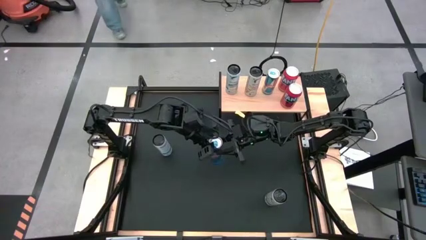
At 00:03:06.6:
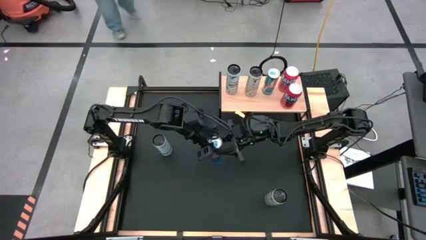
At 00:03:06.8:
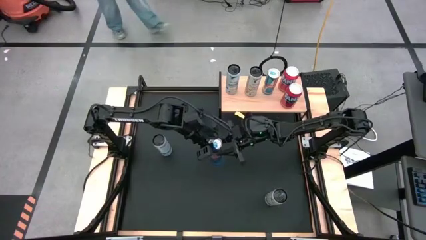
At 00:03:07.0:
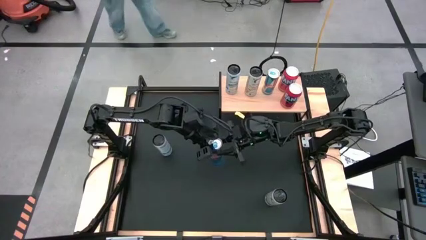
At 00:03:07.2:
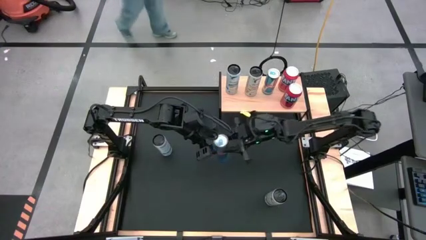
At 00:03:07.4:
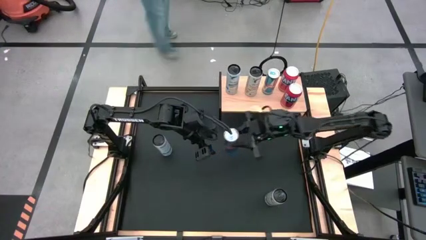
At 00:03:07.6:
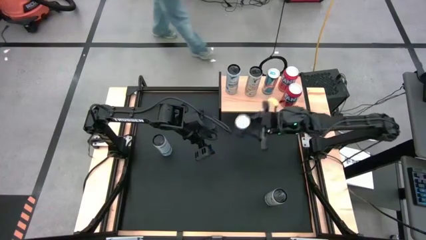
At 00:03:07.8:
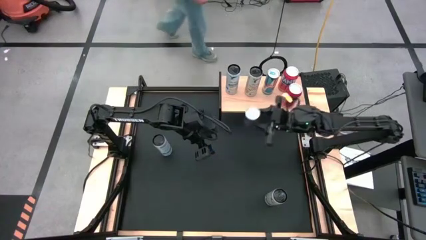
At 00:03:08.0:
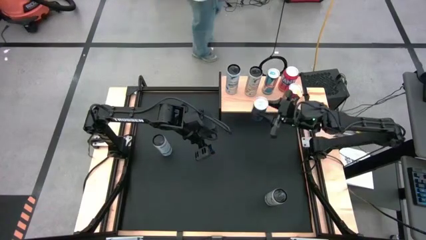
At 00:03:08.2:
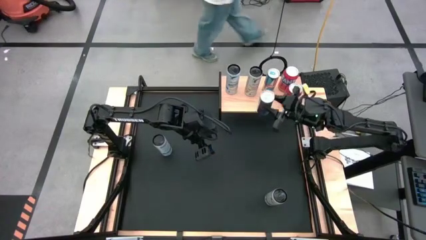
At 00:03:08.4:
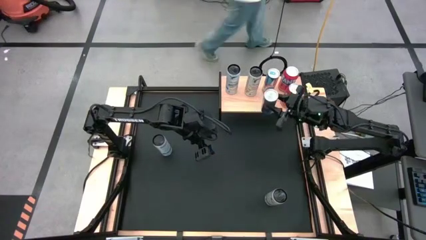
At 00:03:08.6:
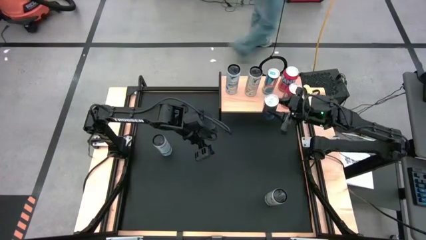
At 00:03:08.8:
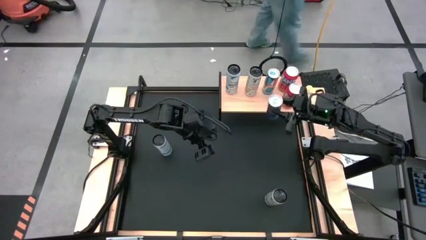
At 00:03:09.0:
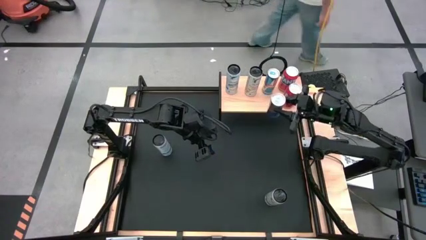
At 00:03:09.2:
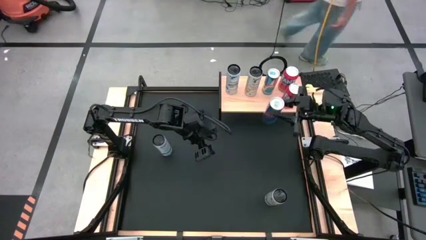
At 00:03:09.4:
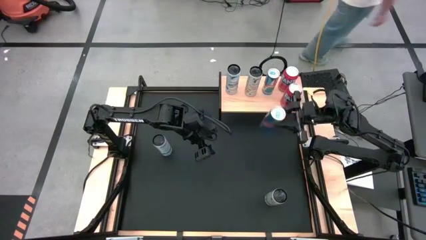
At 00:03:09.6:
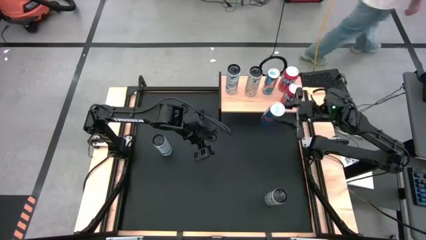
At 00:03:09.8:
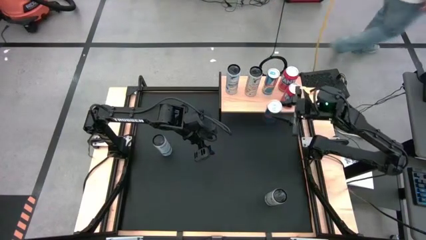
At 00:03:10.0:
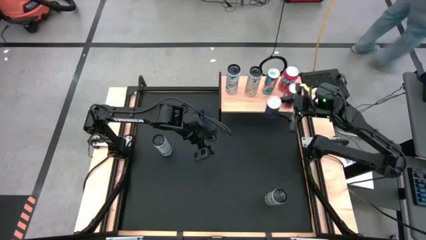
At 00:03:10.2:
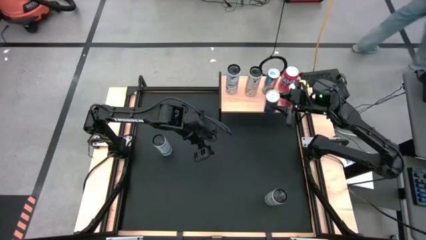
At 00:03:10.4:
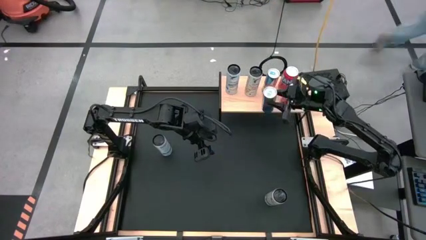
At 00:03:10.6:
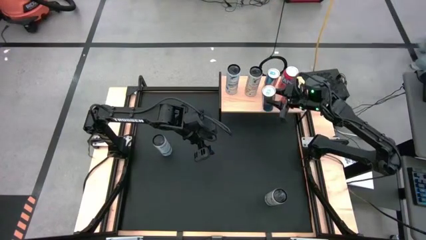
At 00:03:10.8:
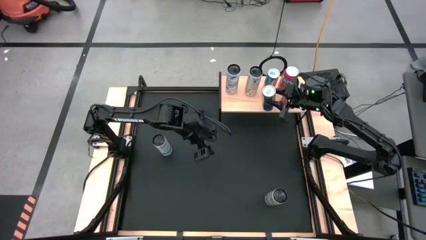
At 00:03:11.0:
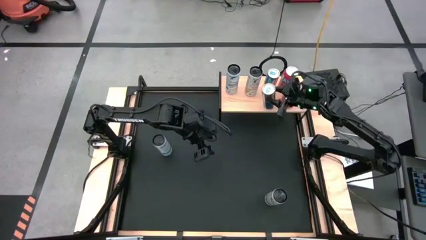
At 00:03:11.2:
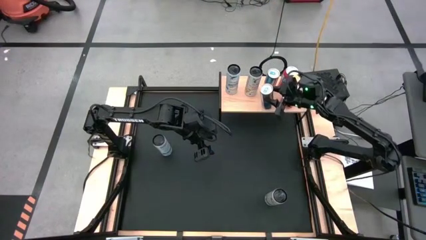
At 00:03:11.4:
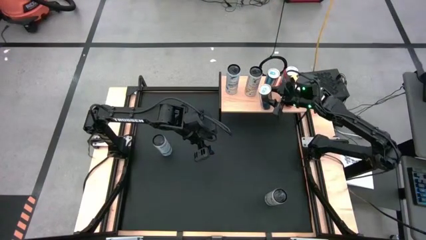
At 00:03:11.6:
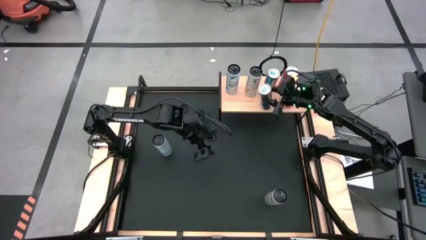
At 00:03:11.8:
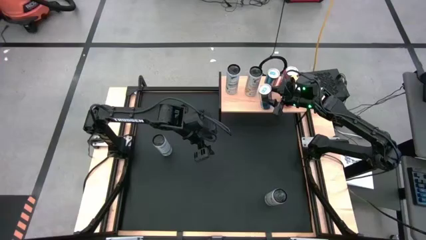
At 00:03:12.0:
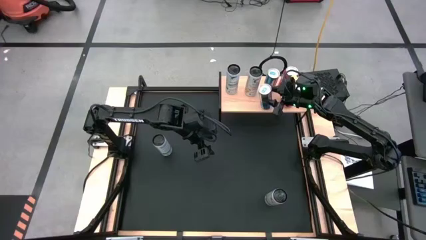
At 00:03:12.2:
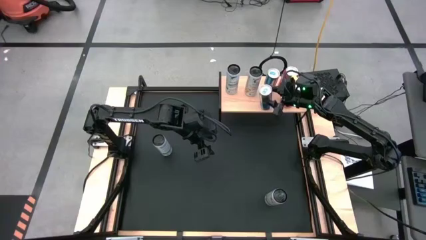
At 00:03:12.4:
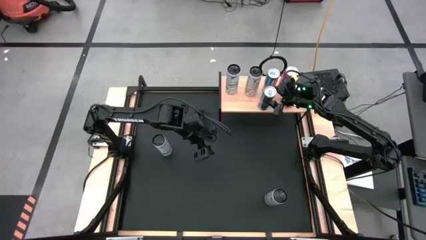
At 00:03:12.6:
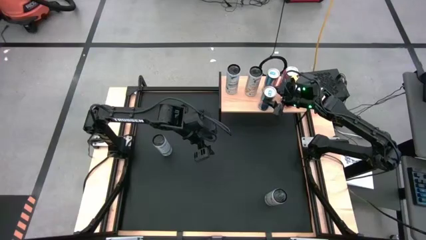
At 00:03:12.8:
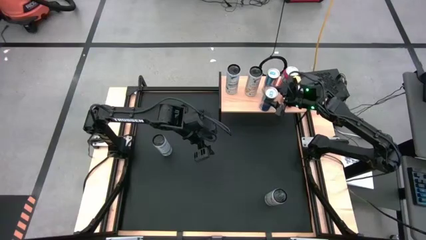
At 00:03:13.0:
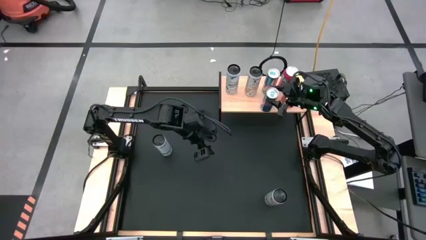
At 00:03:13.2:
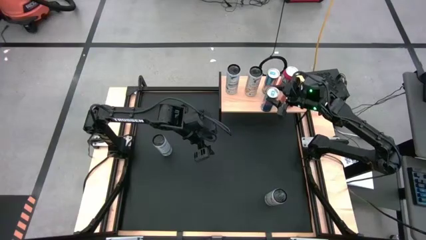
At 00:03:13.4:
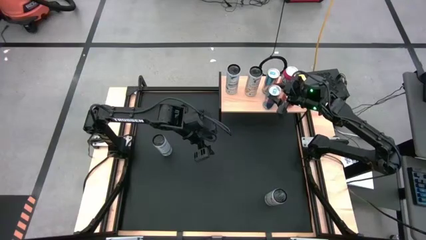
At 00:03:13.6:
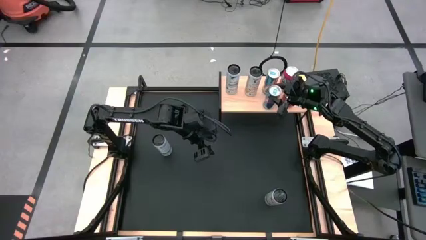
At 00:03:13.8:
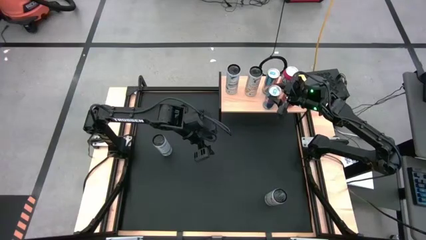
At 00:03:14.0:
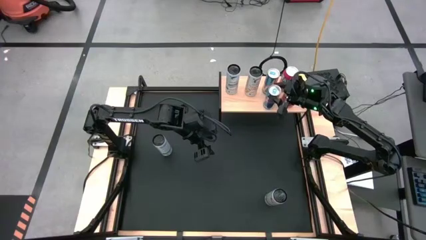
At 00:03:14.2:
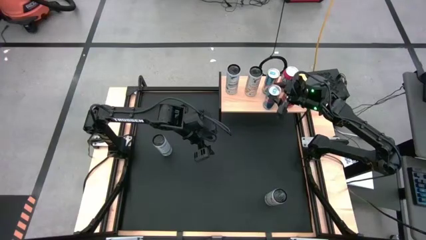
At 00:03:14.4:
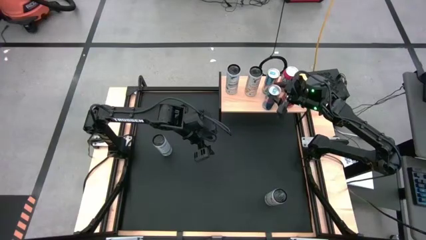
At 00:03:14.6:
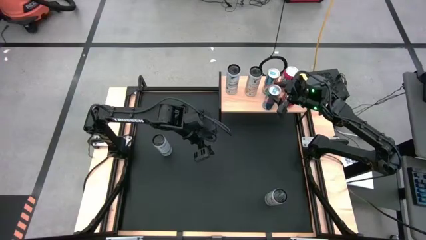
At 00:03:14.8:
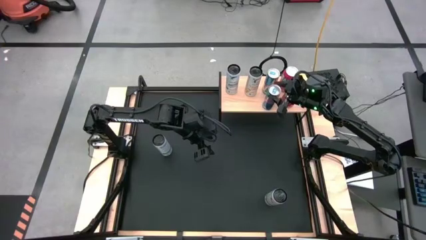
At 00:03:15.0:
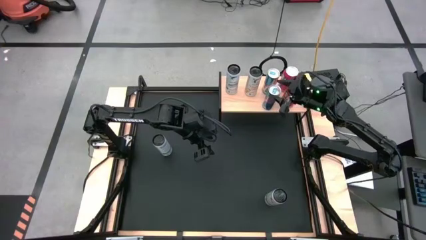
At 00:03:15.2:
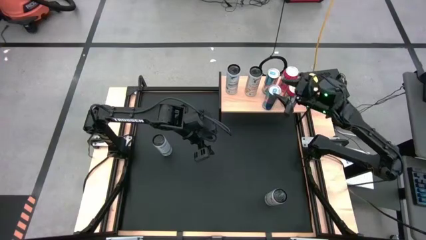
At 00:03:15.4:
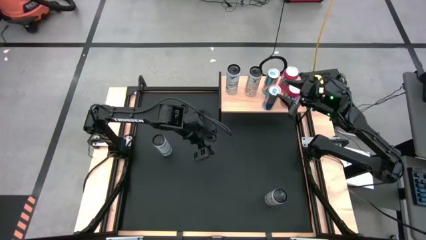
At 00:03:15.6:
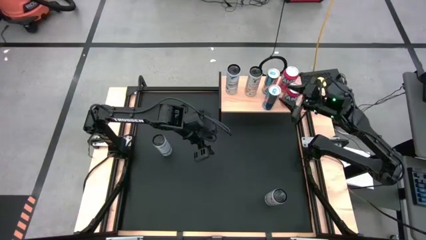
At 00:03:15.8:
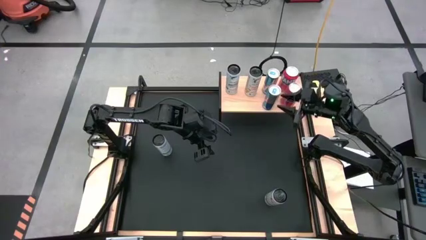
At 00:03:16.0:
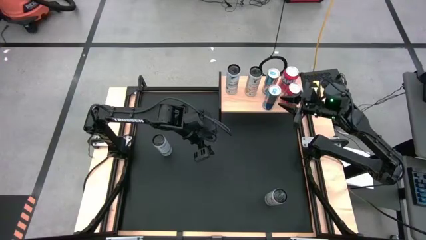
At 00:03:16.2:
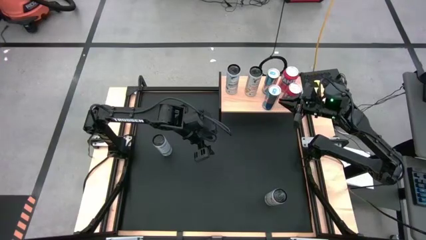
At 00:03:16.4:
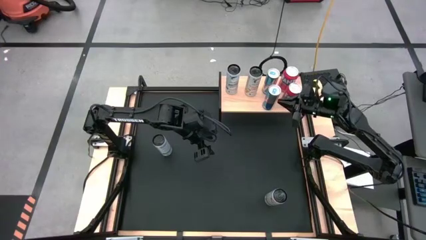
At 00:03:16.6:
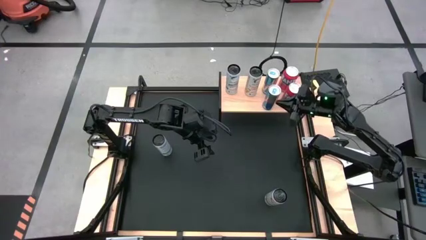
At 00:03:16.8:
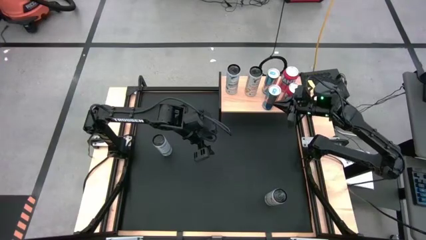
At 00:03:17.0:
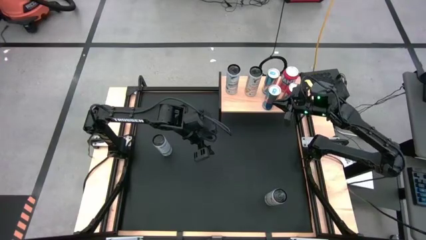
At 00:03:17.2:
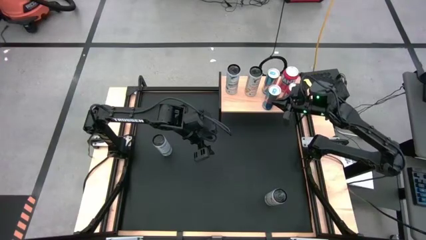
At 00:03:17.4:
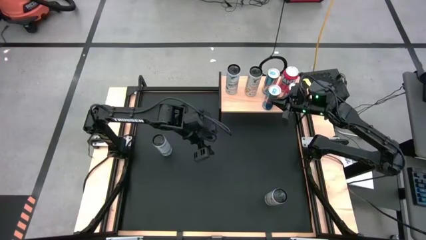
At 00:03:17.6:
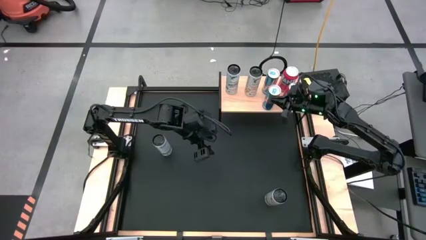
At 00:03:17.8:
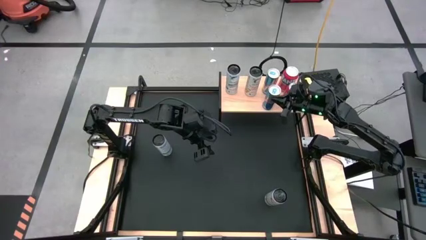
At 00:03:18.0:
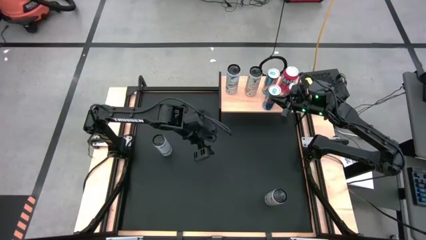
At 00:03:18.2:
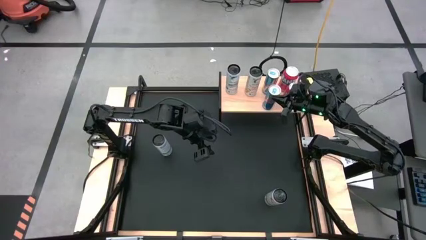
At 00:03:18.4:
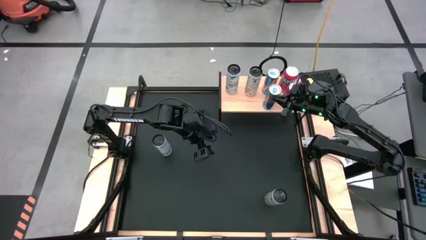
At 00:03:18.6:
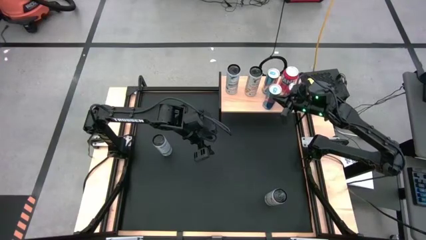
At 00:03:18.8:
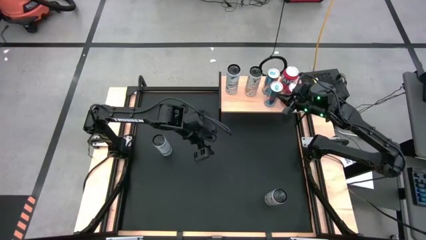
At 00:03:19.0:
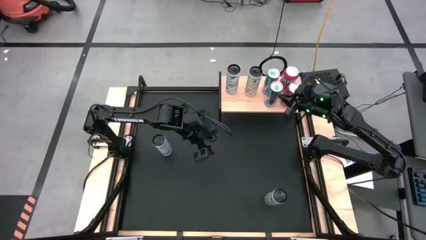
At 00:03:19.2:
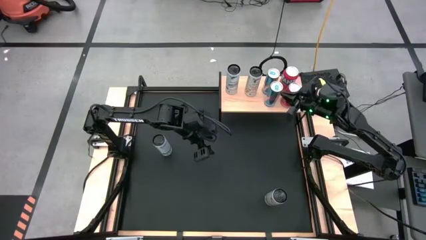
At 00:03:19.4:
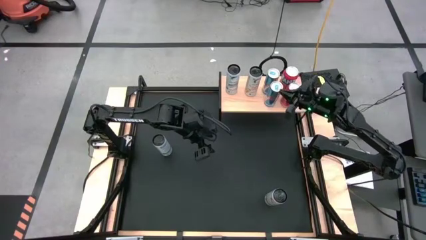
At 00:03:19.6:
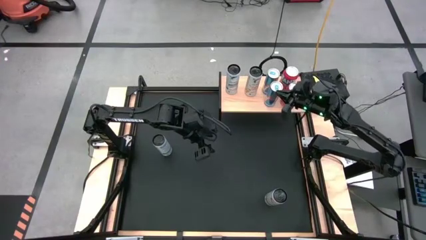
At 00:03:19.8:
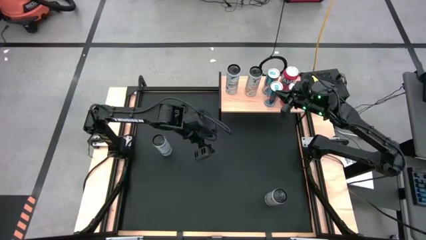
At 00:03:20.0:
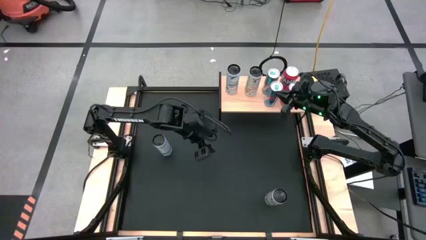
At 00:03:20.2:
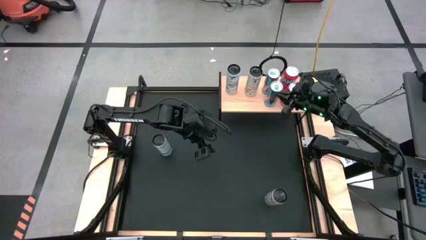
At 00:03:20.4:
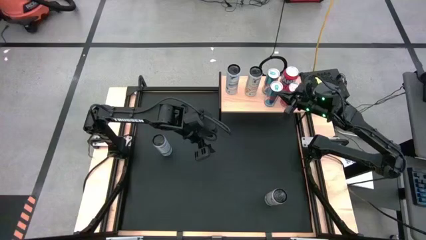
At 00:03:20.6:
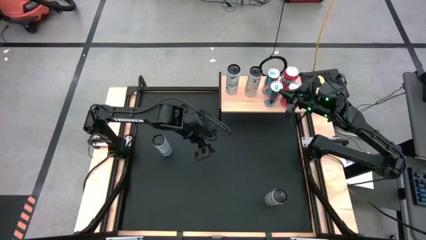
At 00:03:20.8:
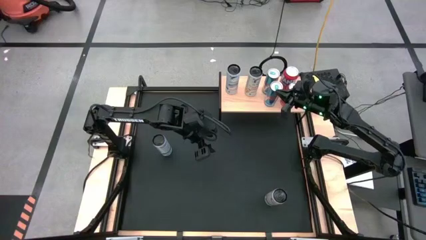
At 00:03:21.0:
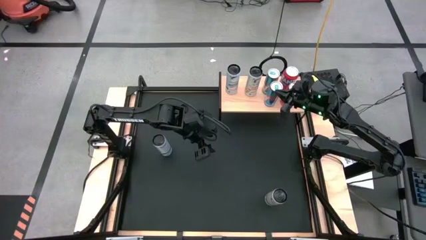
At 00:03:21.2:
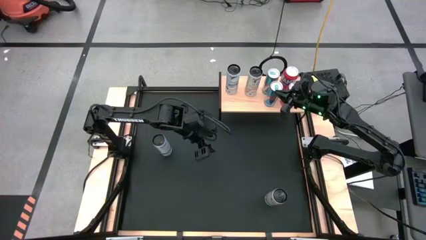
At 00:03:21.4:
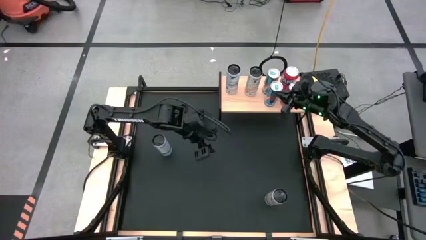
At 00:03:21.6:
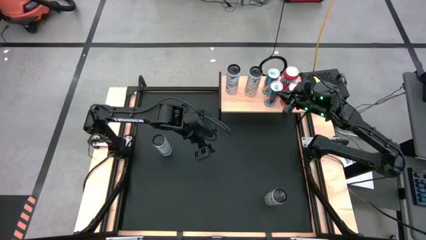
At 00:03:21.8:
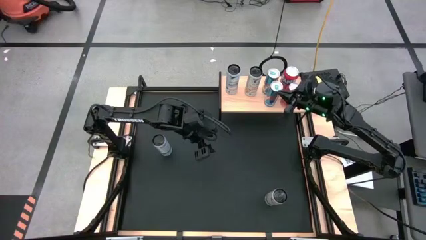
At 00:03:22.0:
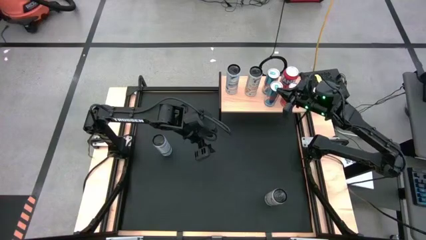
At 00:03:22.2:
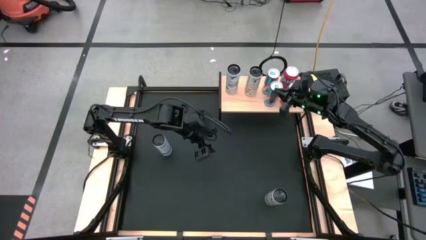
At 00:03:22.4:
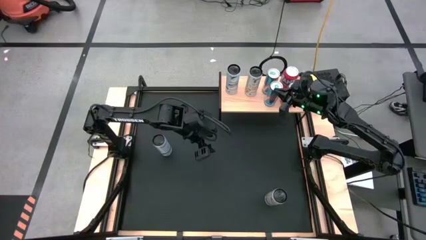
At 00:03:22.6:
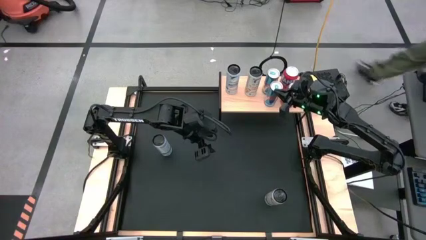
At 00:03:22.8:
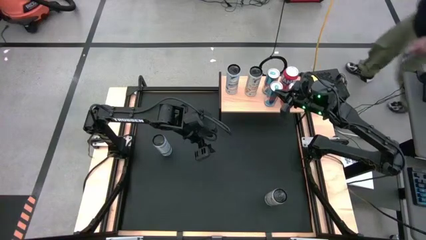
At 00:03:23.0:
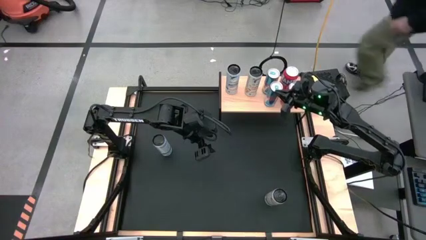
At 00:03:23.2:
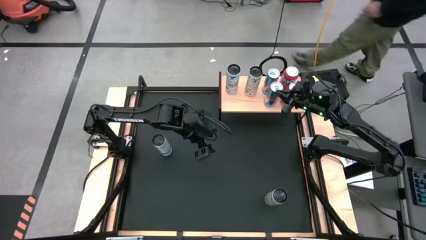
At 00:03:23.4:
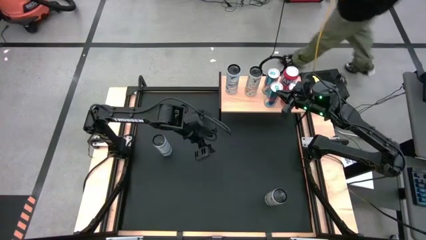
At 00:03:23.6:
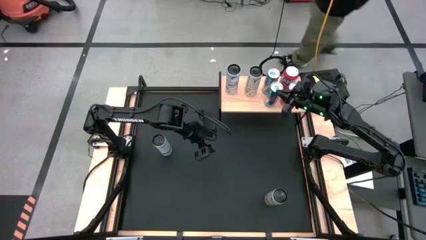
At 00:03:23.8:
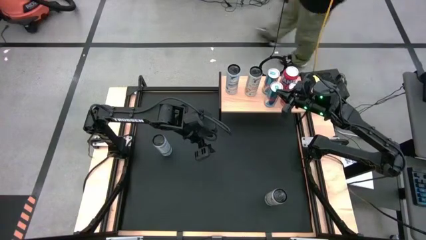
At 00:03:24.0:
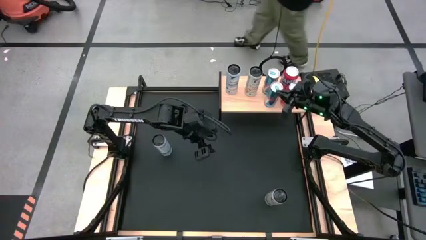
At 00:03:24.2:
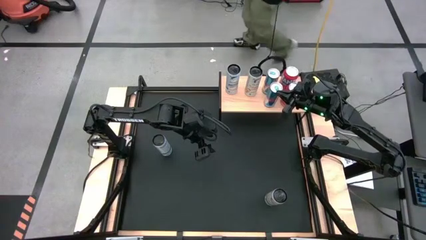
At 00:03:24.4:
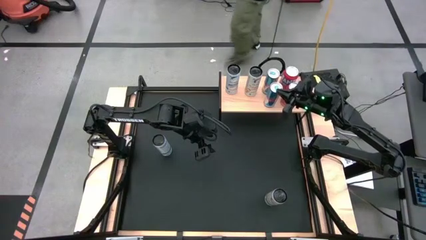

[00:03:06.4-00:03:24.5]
Task: Place canned beverage on shelf
Put the blue soda can on the shelf aligned with the blue soda can
